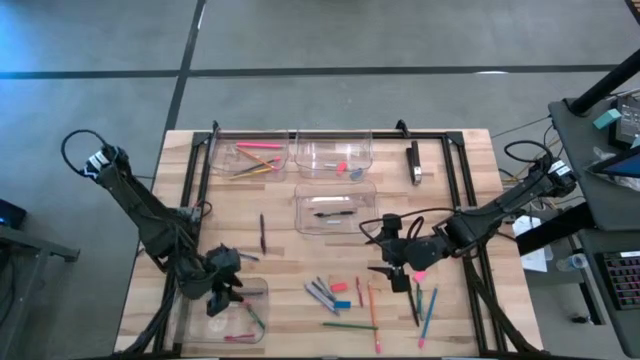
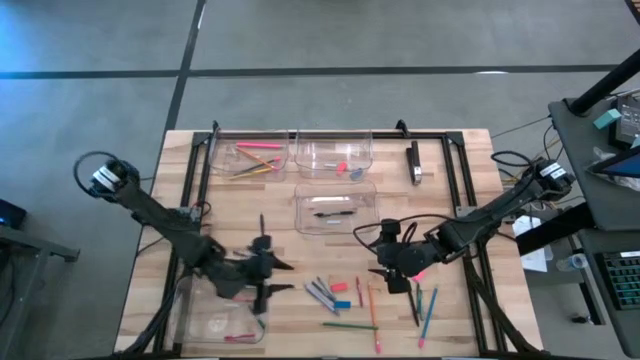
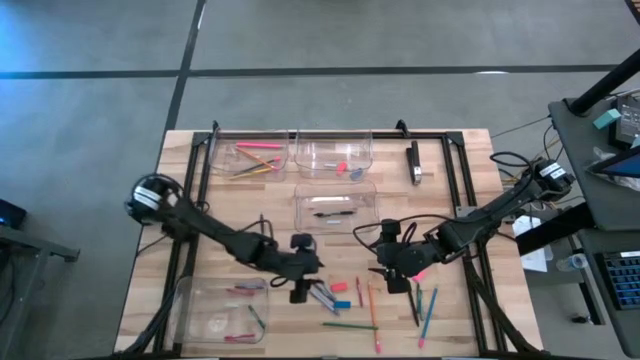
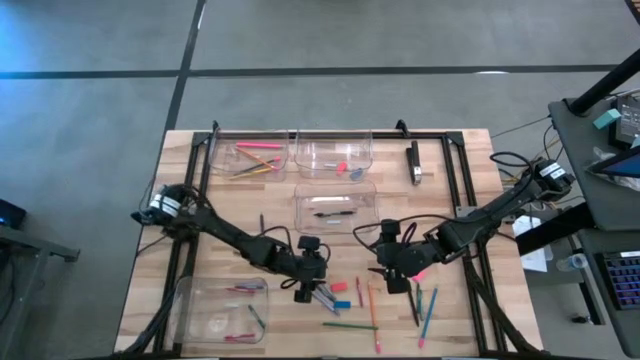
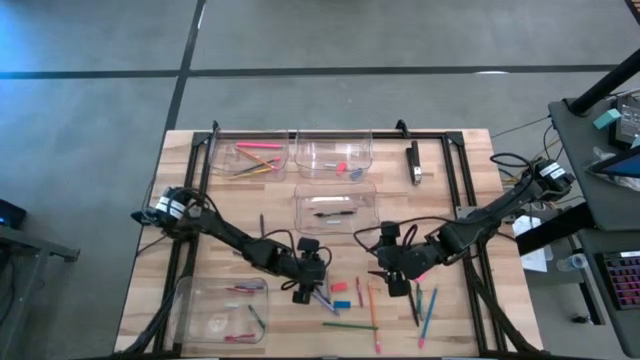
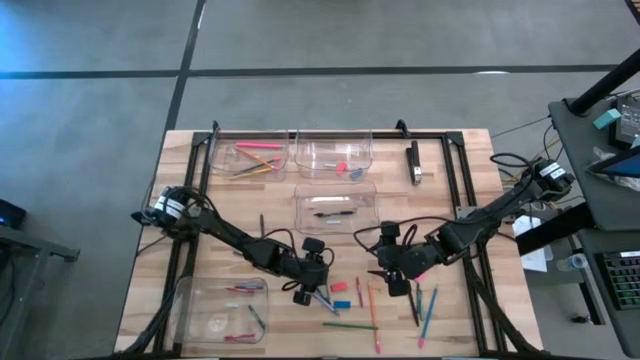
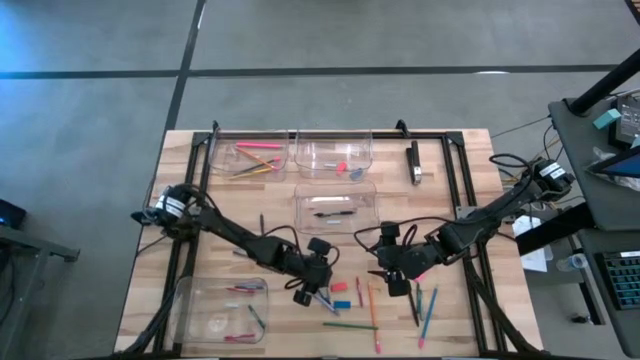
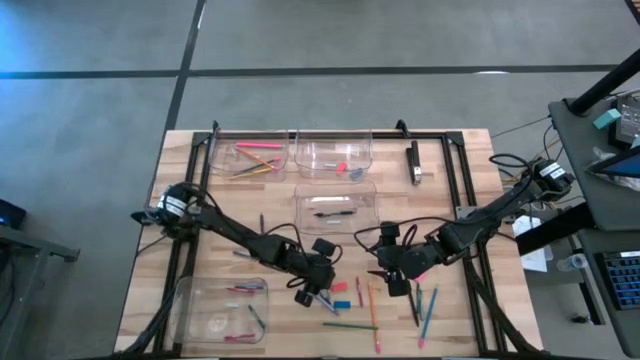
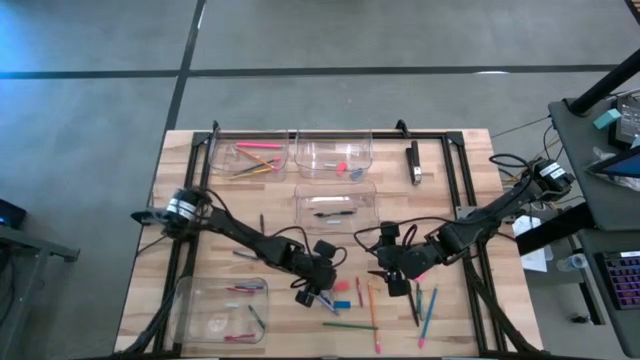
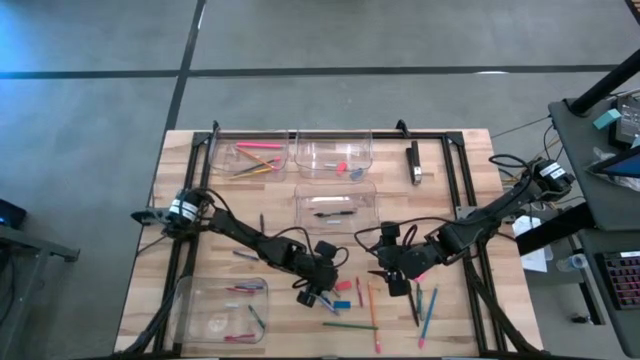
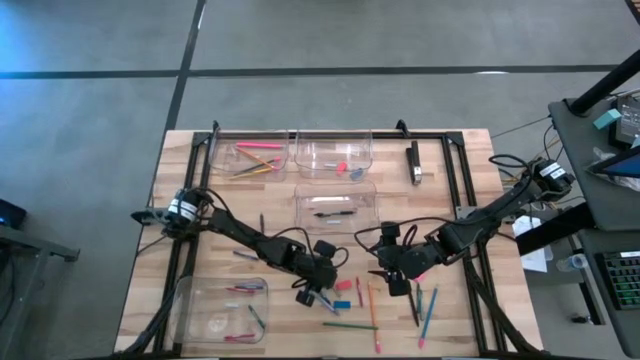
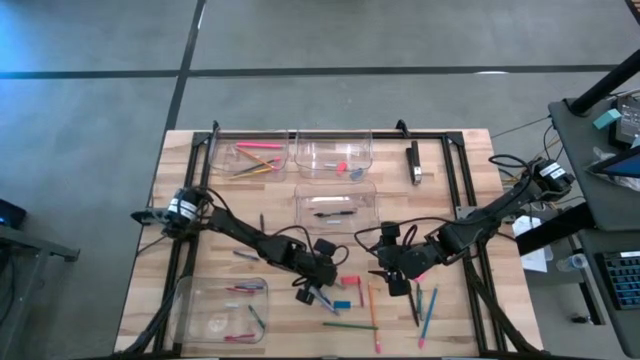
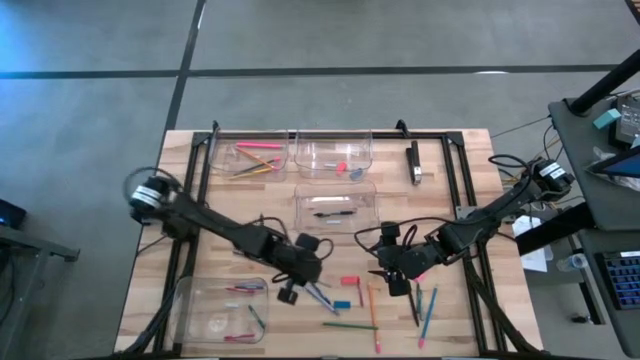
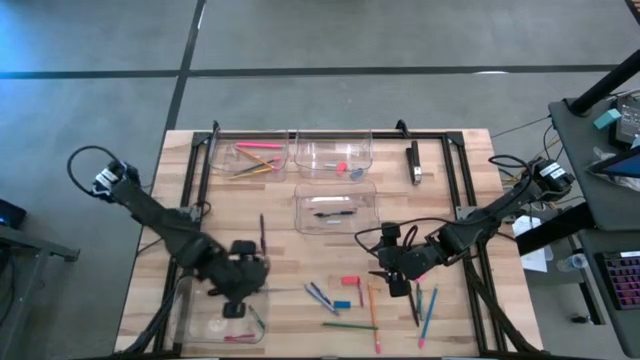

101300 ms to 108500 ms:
Task: Sort crayons/erasers/pens/pencils in bins
Put the left gray crayon into the bottom transparent bin

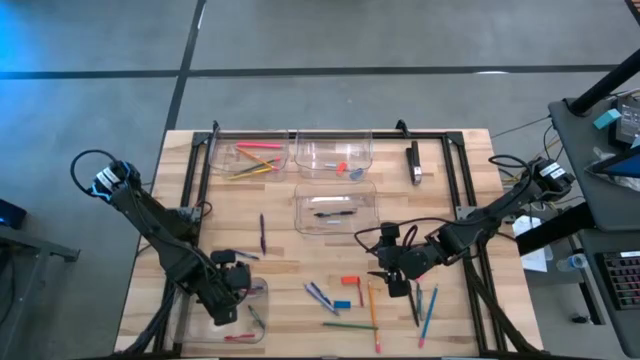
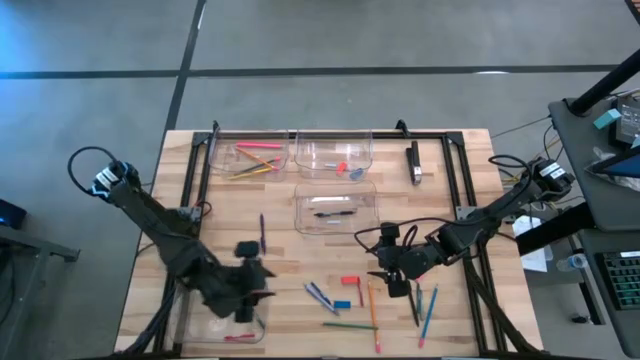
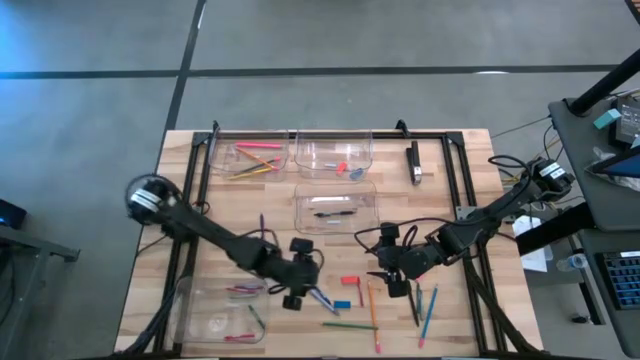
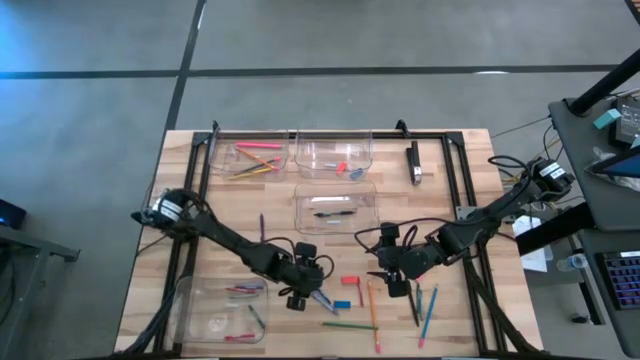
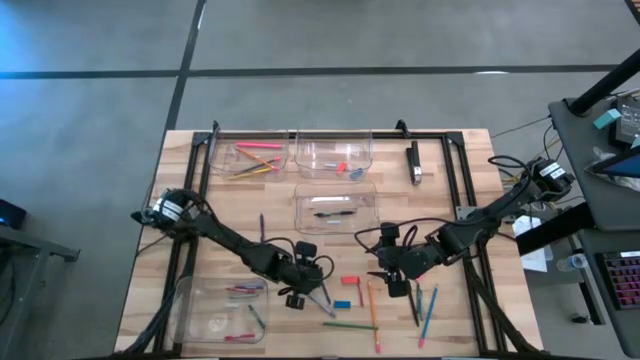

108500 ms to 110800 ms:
Put the bottom blue crayon into the bottom transparent bin

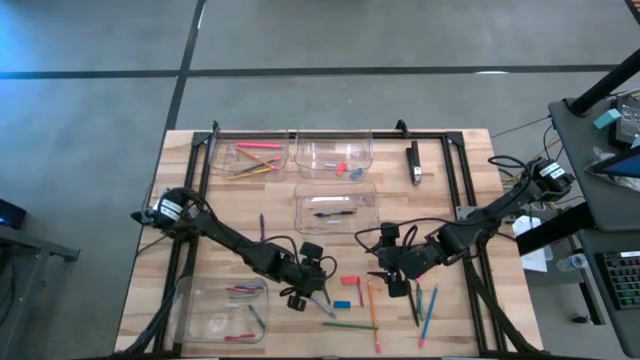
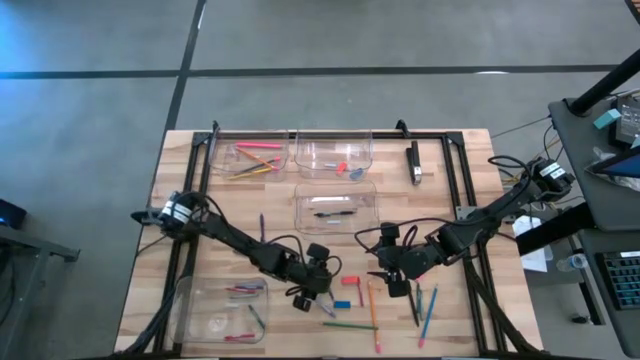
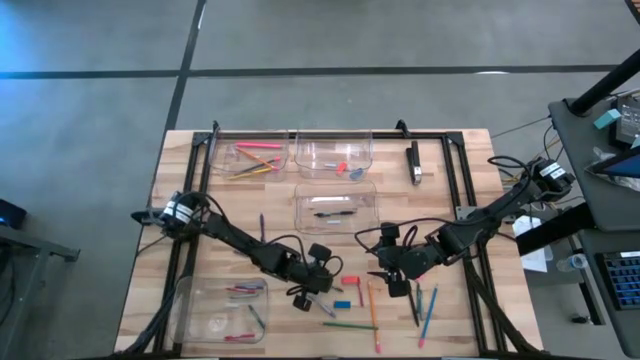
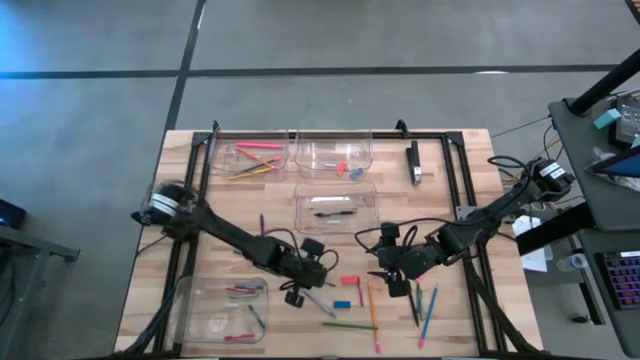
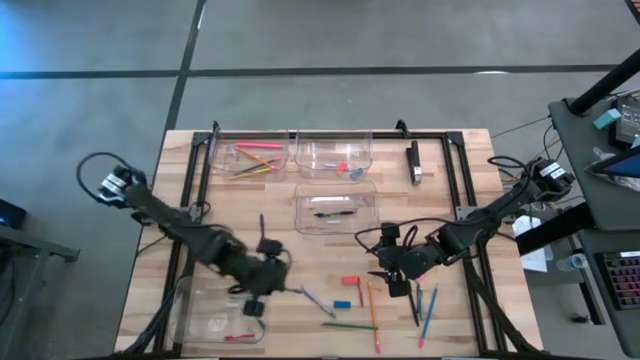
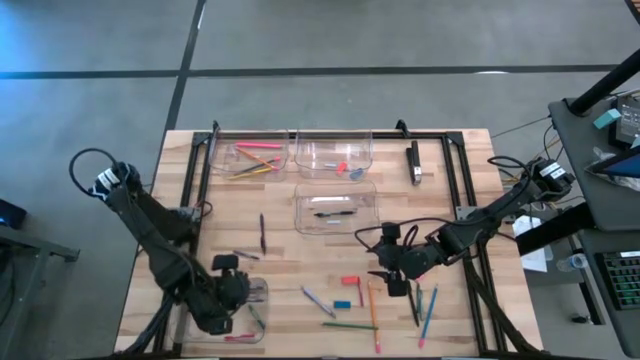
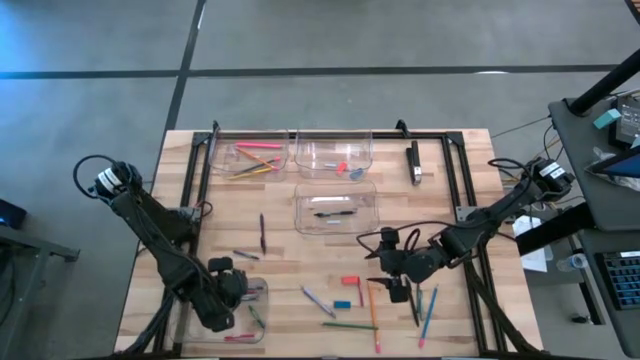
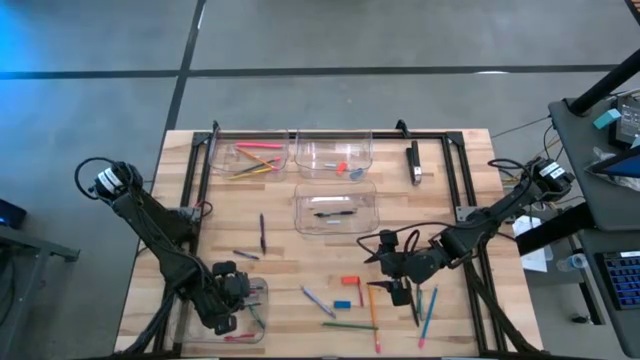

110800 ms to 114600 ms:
Put the bottom blue crayon into the bottom transparent bin

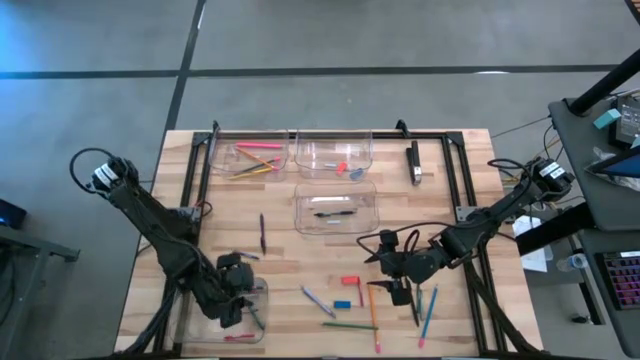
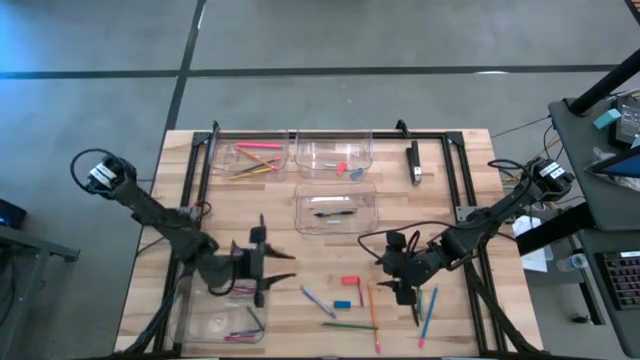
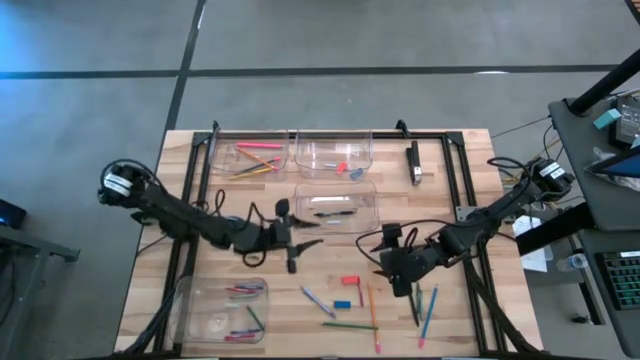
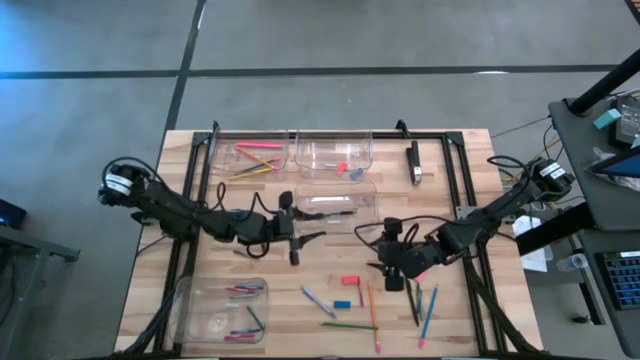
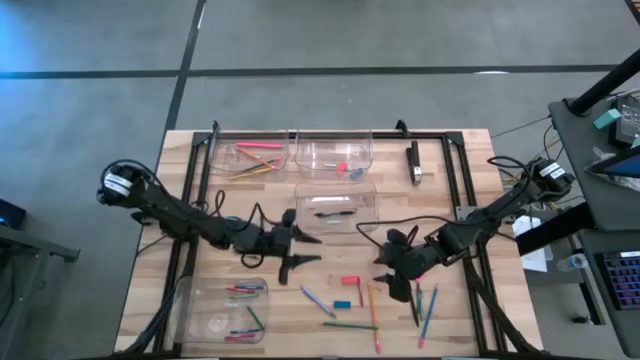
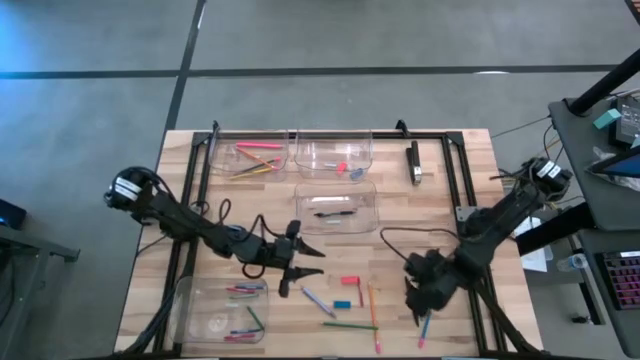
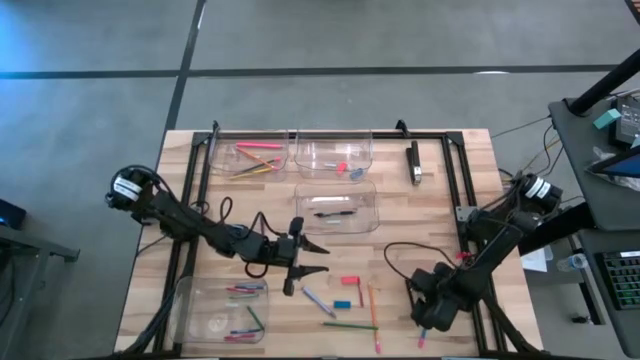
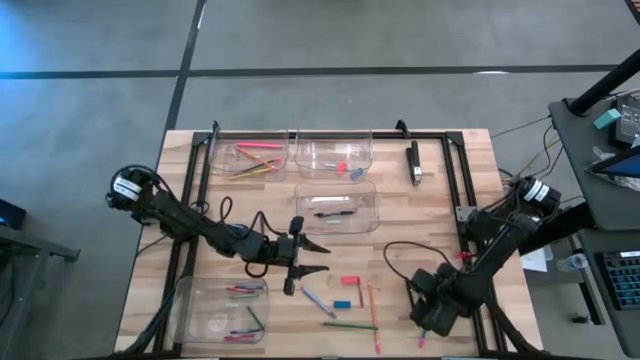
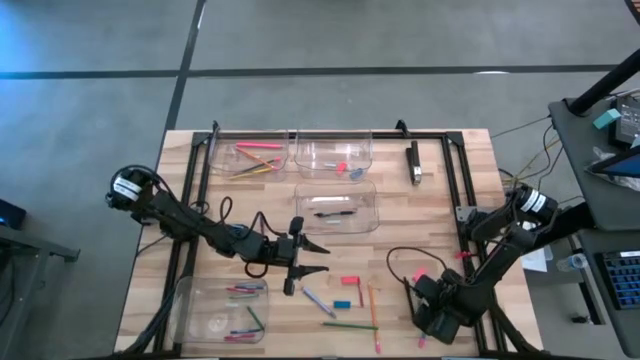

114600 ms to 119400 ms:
Put the gray crayon into the bottom transparent bin

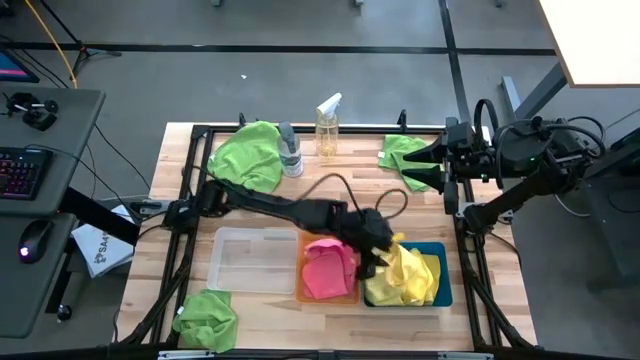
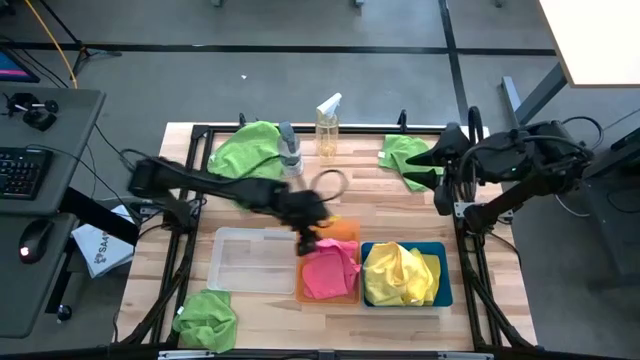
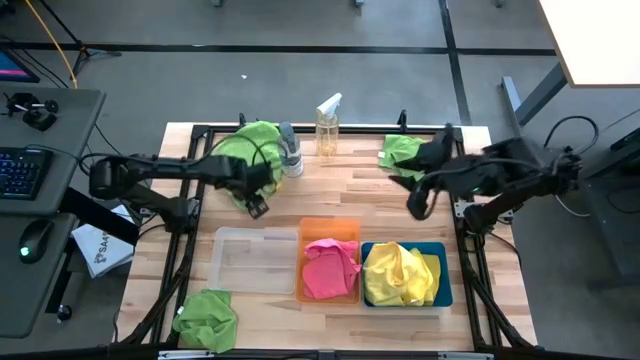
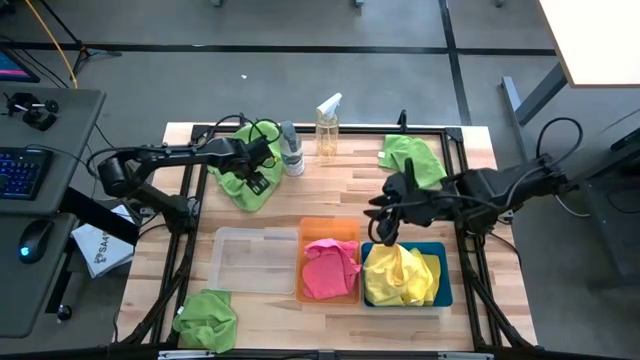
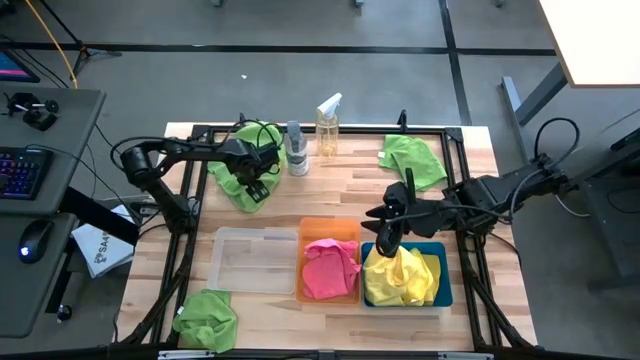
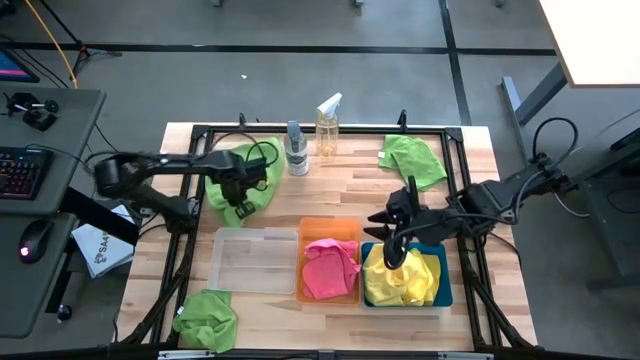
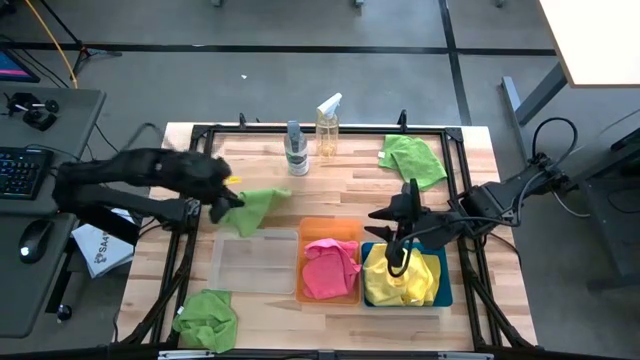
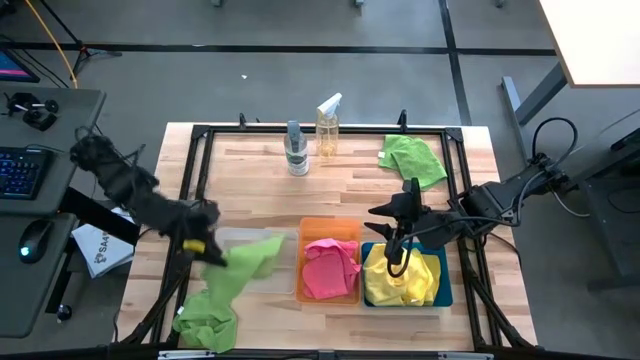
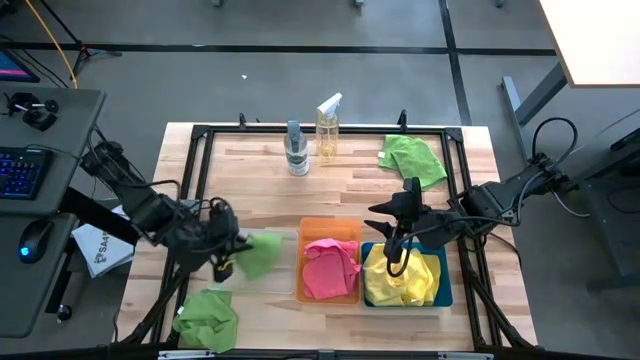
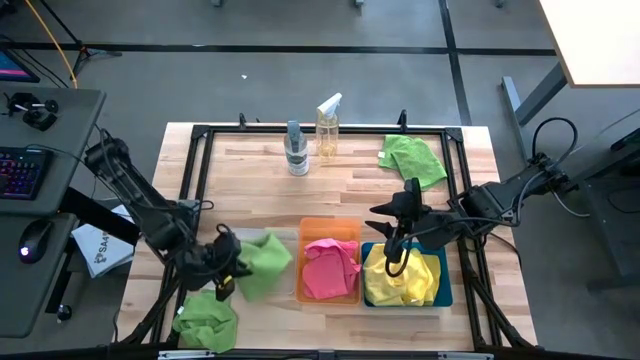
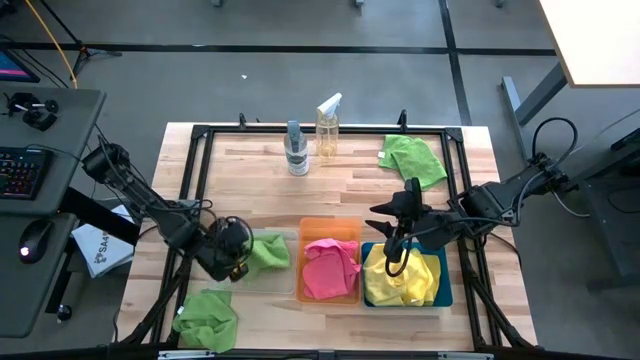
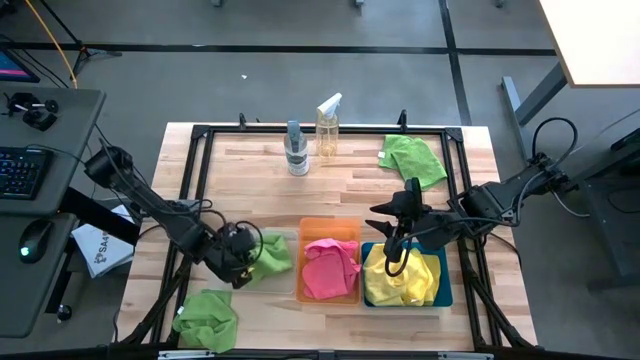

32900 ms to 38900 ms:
Task: Sort microfiber towel by color & place in baskets
Put the top left green towel into the transparent bin
